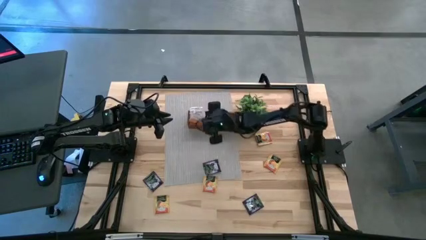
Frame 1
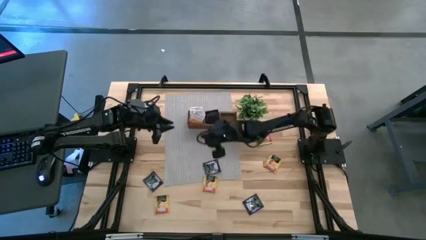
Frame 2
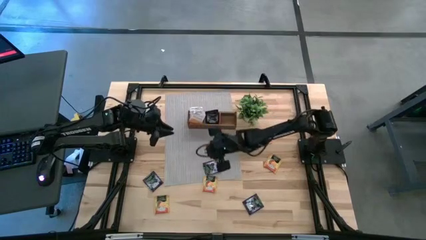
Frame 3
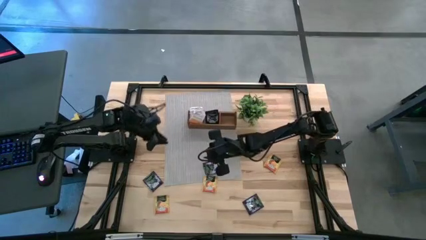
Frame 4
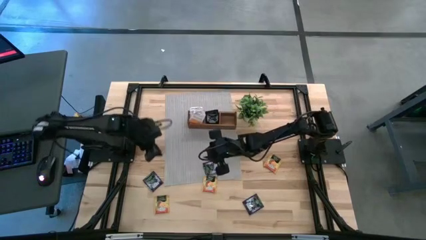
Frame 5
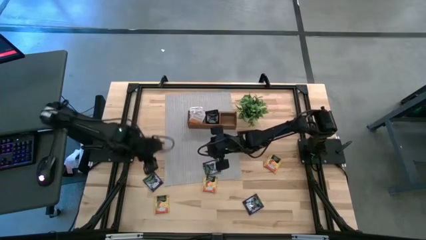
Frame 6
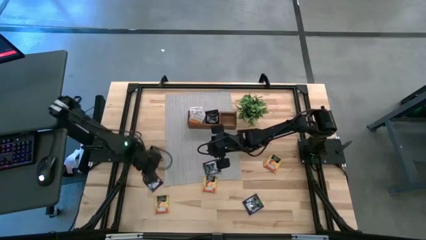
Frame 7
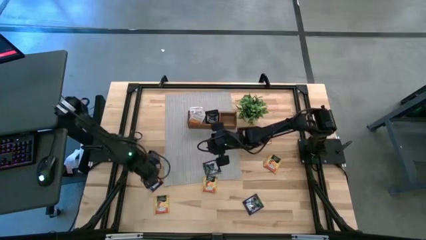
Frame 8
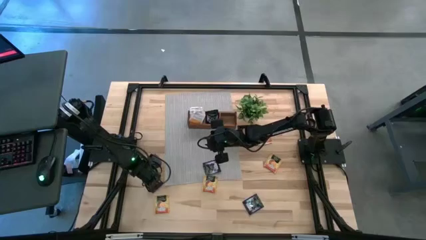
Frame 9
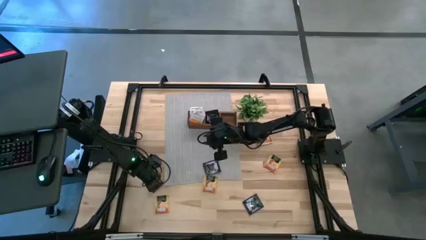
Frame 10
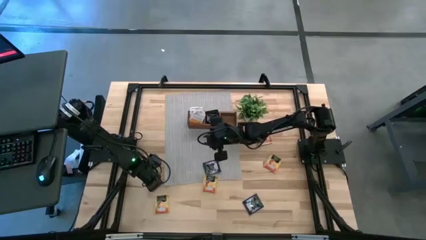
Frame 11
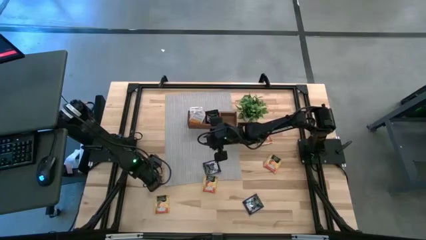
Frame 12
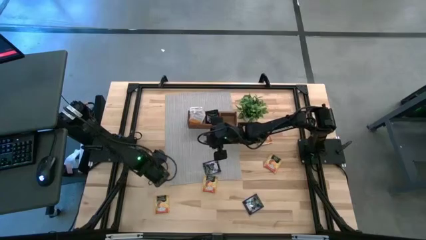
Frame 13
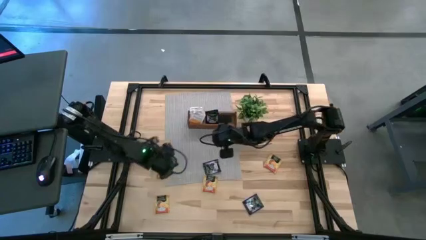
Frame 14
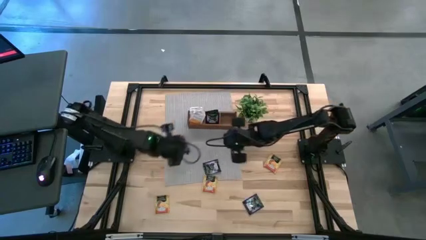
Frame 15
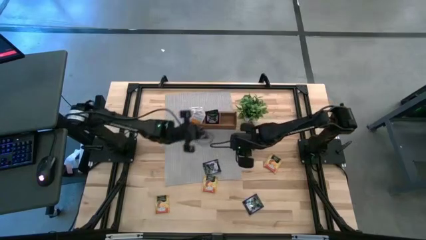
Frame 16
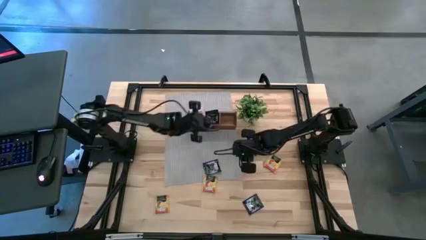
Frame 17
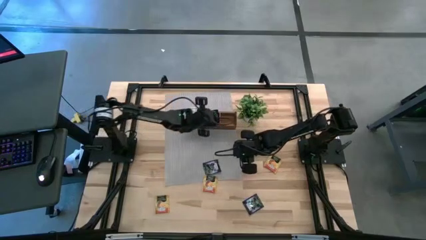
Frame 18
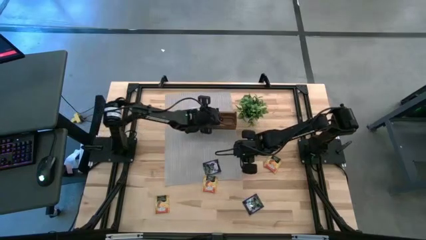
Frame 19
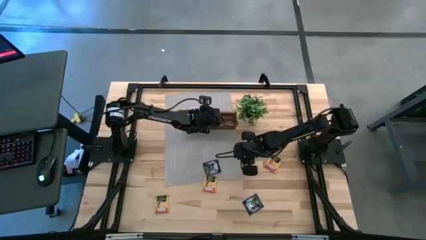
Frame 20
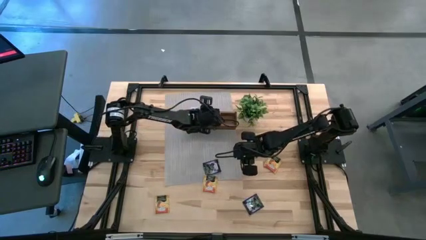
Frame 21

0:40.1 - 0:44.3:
Task: Pick & Place Tea
Put the black tea bag in the middle section of the brown wooden organizer

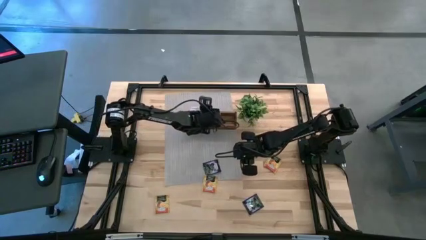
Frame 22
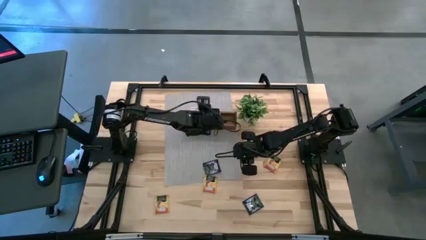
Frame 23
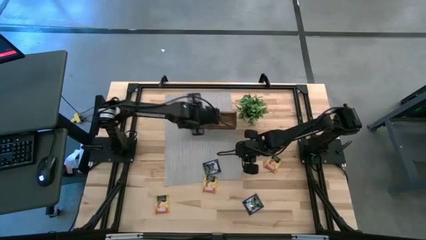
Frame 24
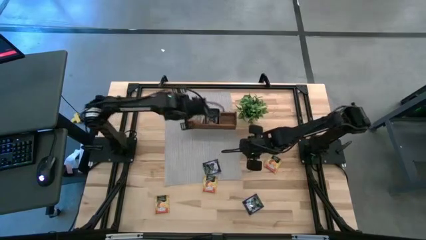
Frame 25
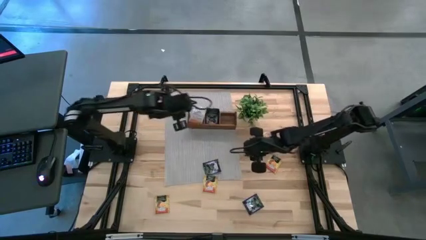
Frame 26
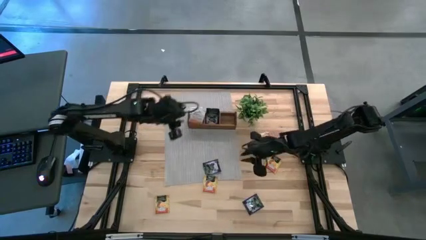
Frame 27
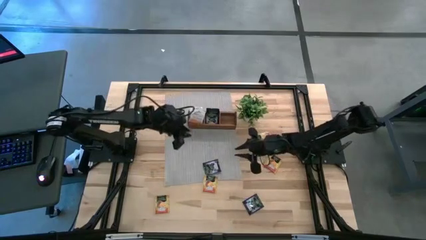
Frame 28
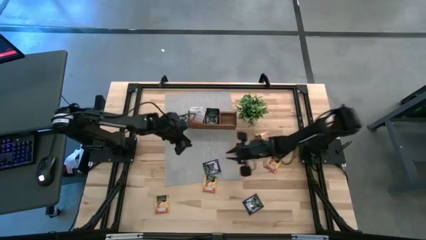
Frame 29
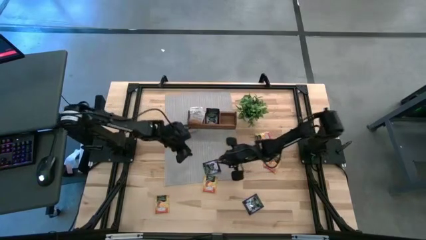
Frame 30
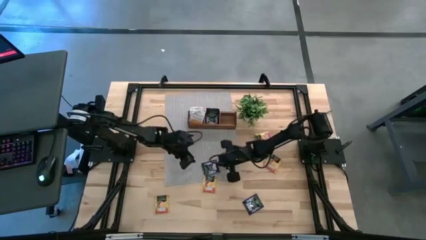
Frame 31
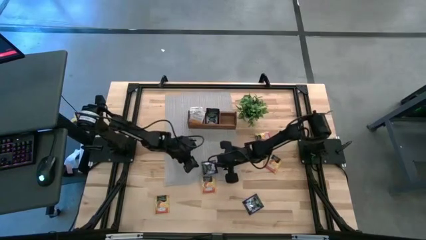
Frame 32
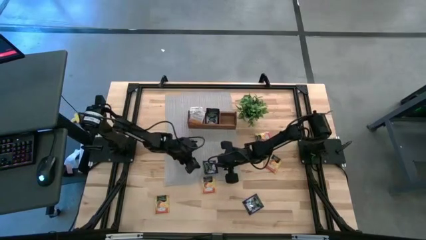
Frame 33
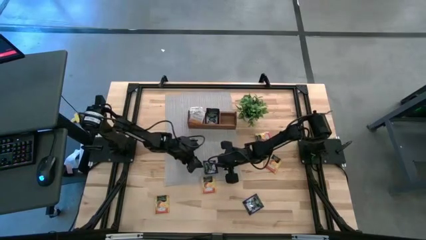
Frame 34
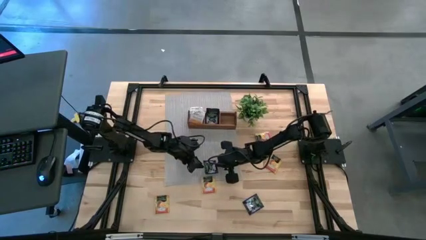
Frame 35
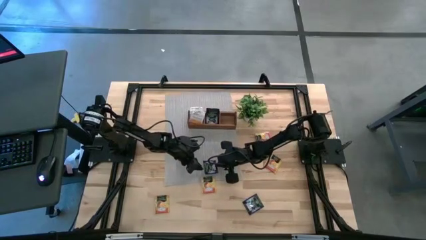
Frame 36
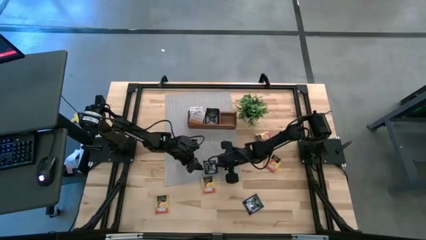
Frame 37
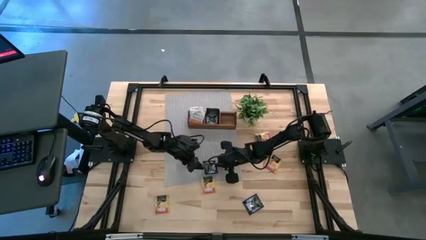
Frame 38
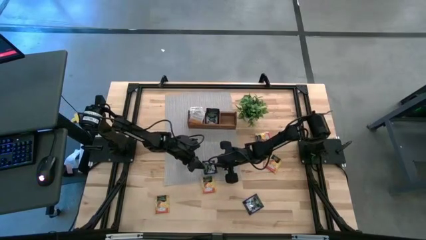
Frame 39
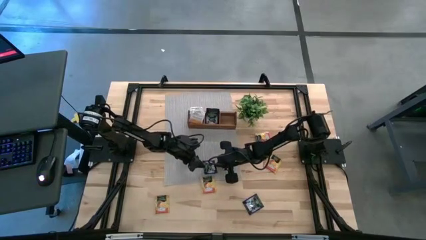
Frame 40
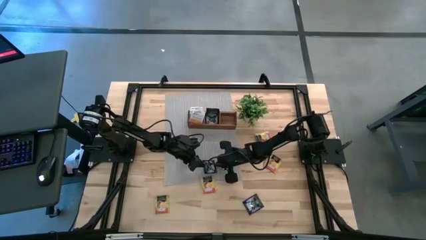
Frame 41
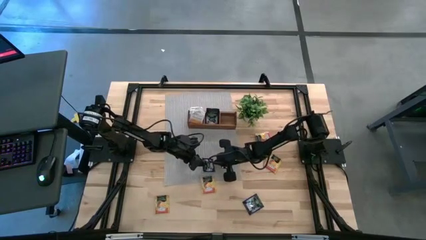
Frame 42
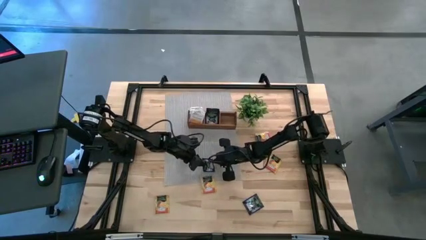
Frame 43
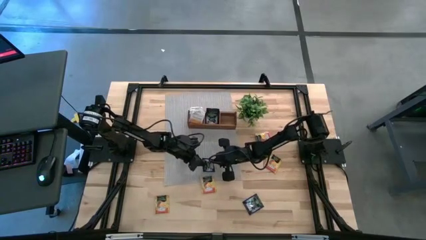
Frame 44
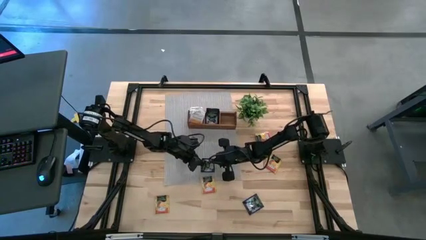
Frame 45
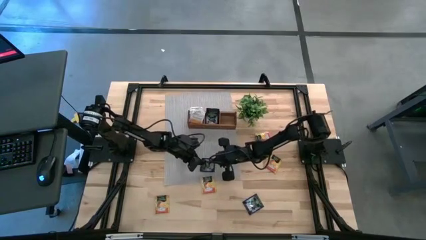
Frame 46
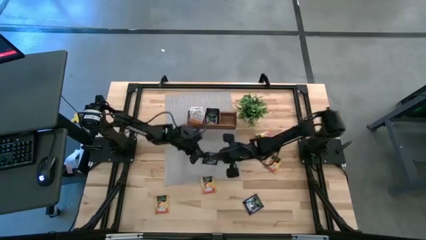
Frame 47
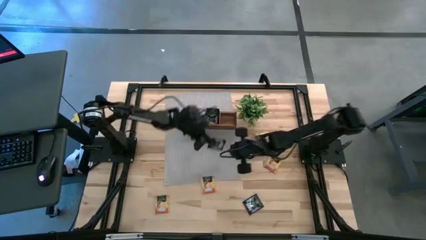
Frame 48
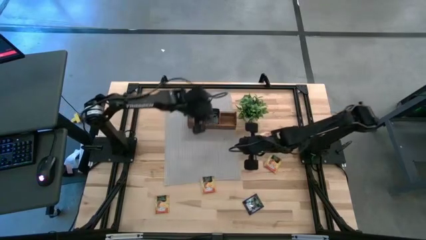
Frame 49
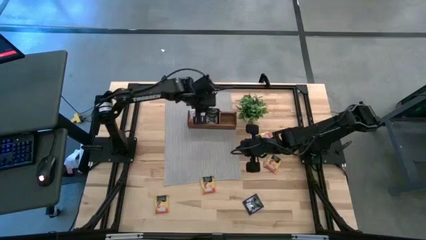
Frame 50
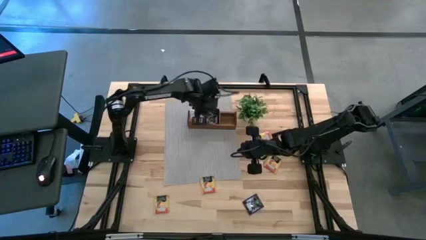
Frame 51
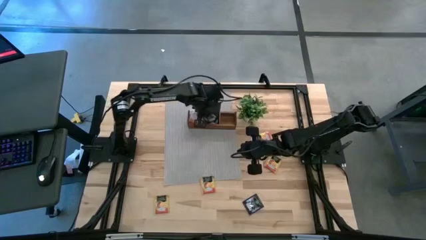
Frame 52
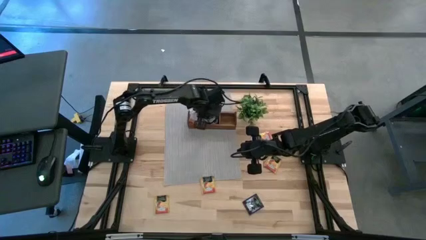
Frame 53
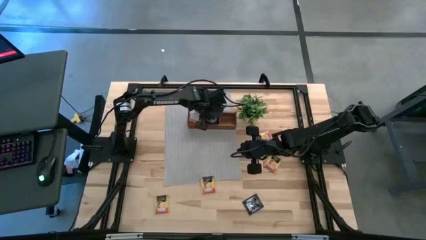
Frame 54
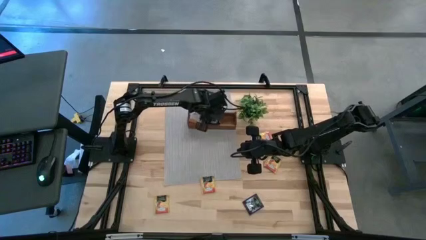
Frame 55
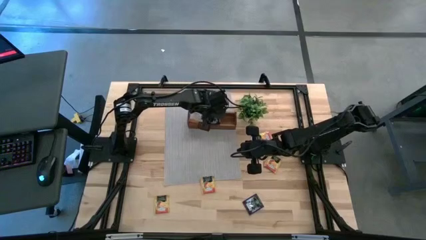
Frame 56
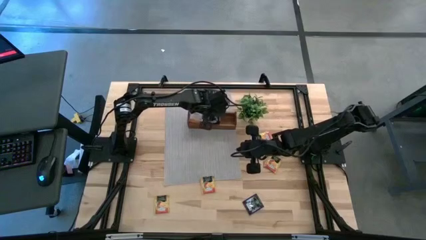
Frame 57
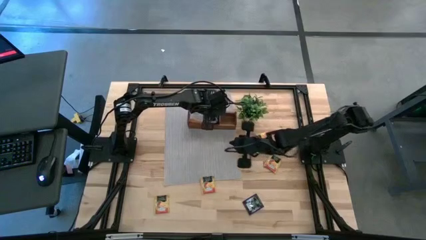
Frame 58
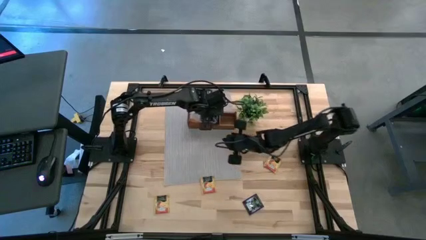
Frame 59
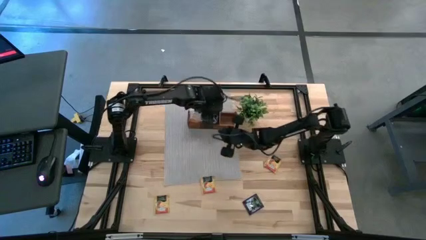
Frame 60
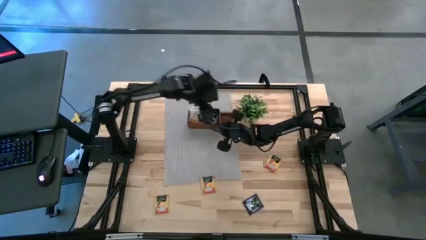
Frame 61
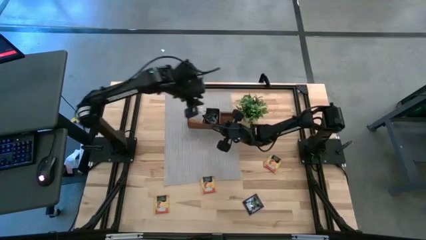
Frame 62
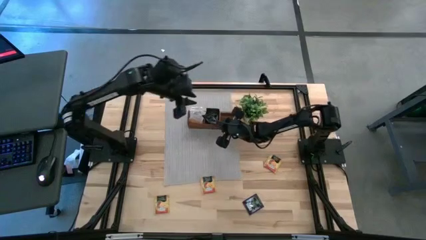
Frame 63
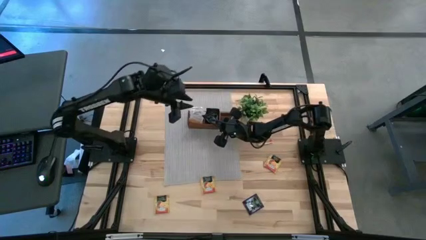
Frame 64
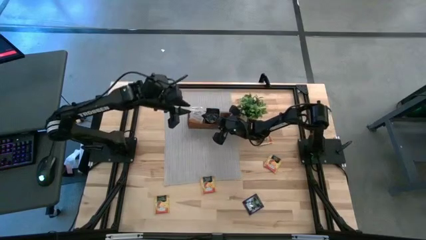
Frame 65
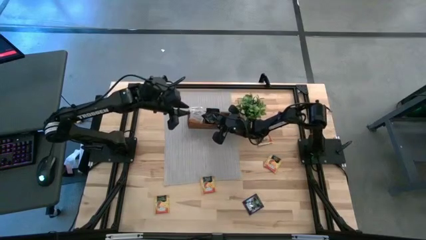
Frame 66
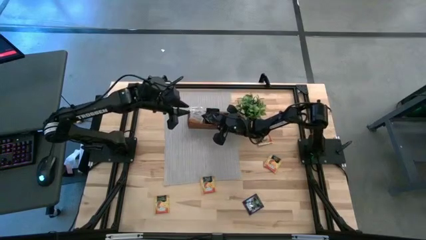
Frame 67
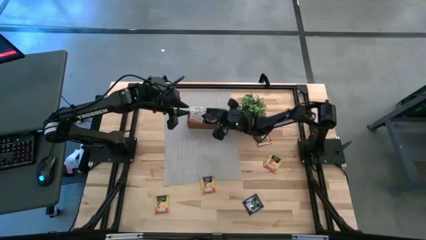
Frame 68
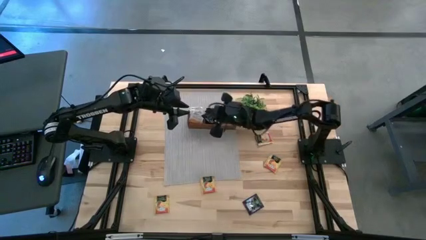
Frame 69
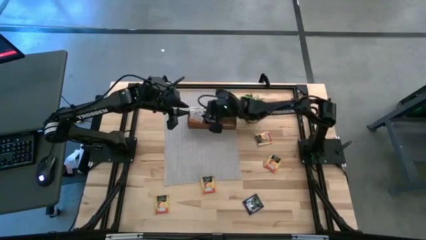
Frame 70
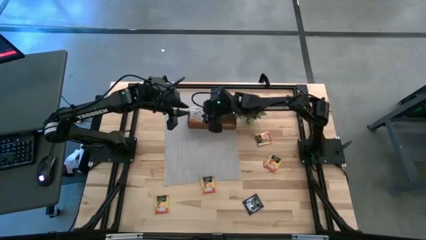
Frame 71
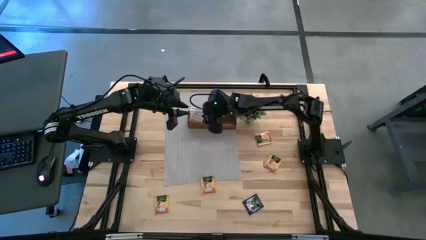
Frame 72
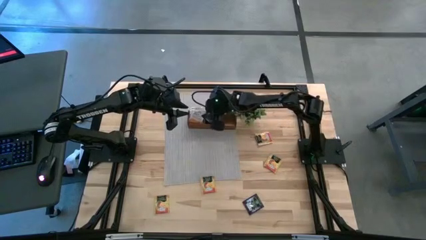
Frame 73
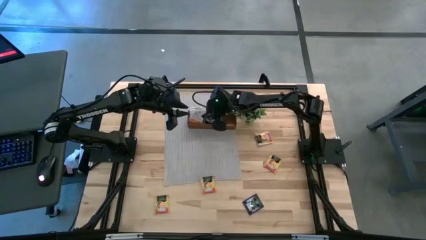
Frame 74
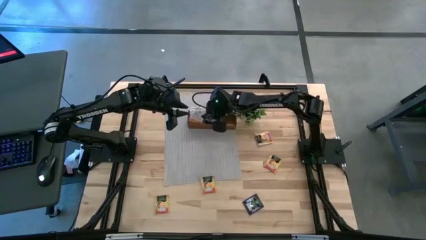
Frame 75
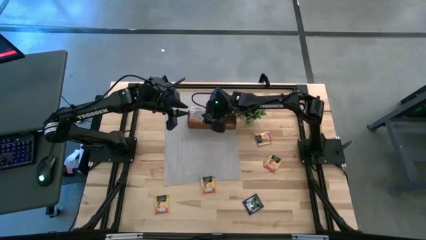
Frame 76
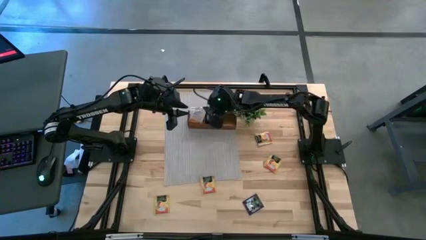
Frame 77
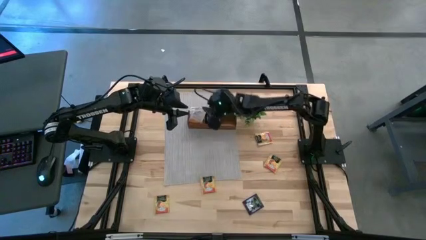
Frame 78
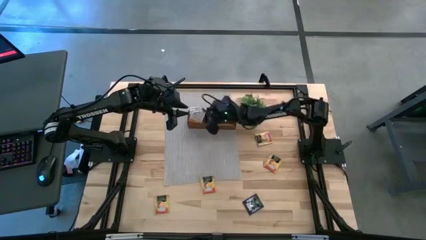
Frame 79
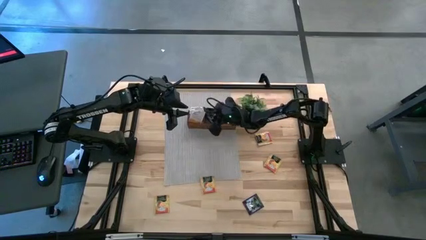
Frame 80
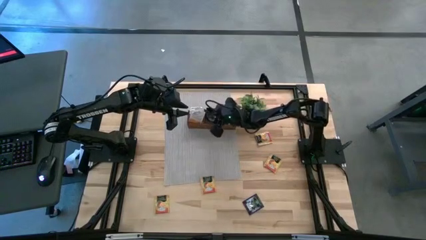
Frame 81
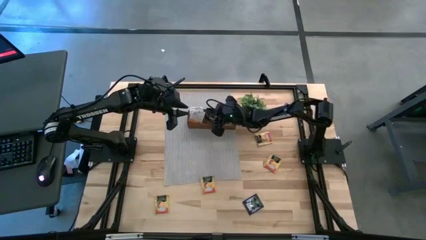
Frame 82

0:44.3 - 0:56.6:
Put the black tea bag in the middle section of the brown wooden organizer

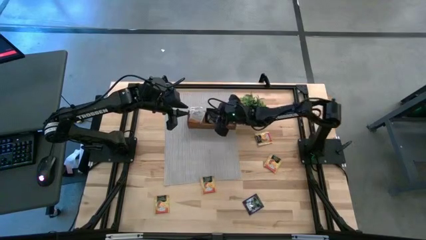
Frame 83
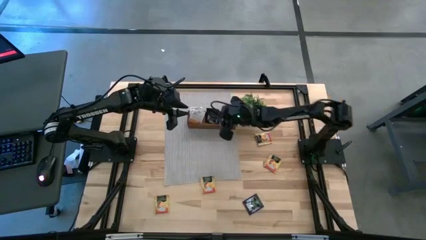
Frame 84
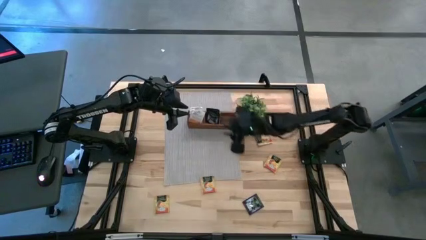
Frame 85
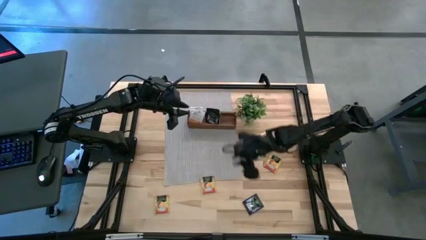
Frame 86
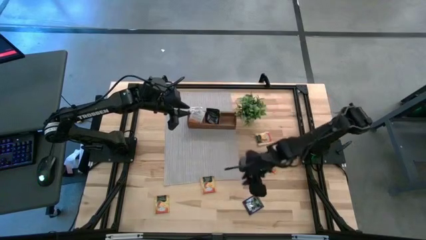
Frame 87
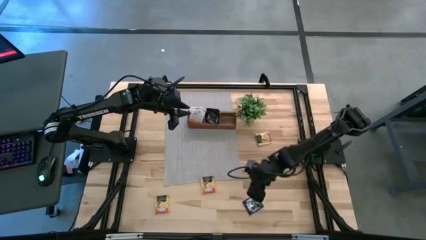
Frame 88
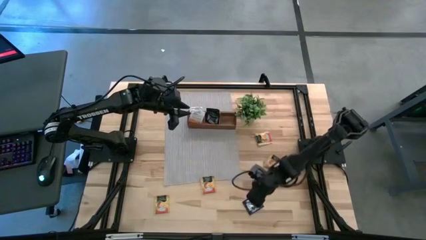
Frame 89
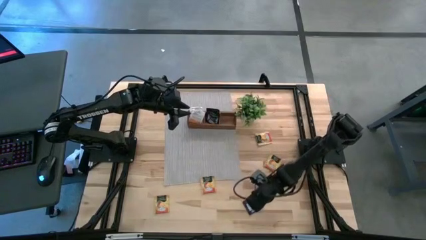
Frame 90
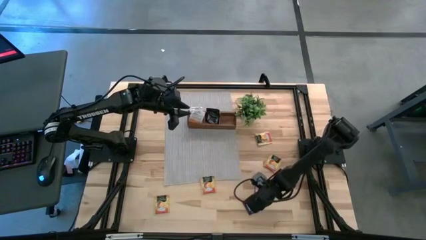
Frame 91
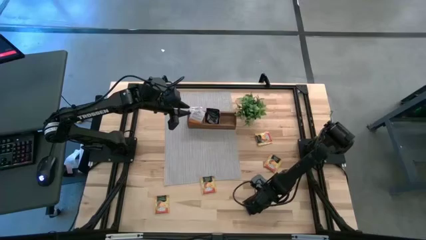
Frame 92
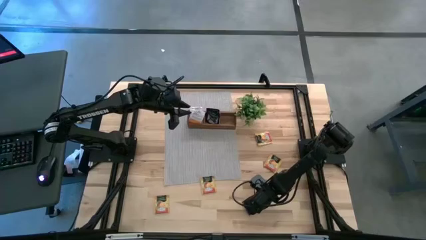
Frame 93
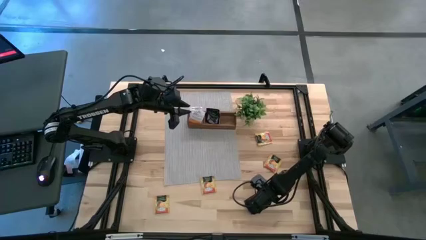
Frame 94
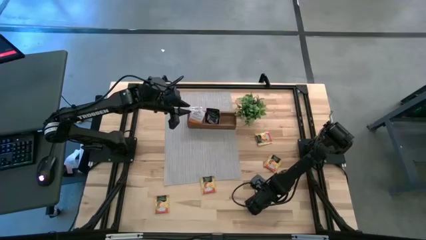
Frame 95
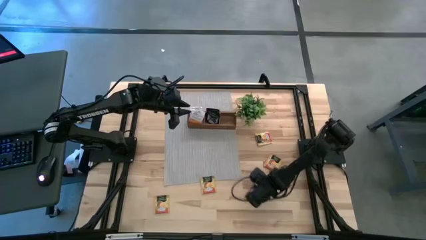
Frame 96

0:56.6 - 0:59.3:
Put the black tea bag in the middle section of the brown wooden organizer
